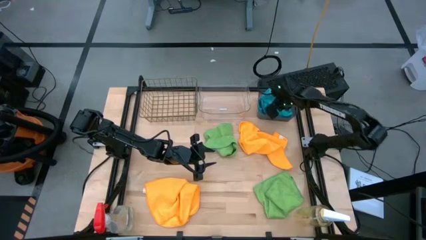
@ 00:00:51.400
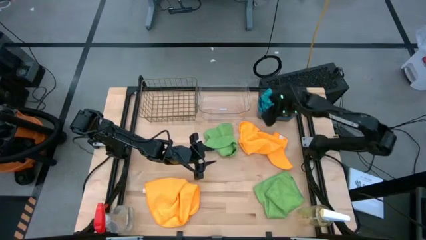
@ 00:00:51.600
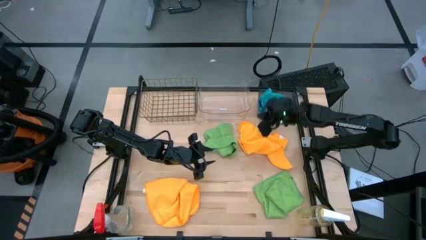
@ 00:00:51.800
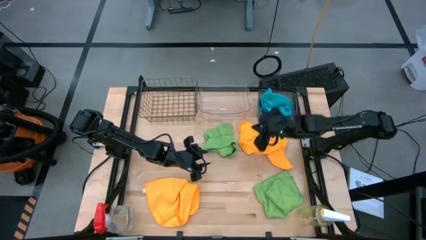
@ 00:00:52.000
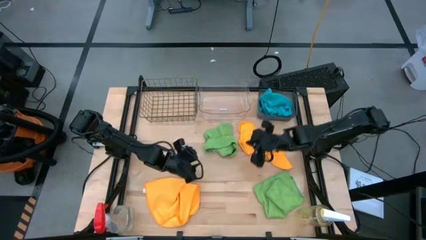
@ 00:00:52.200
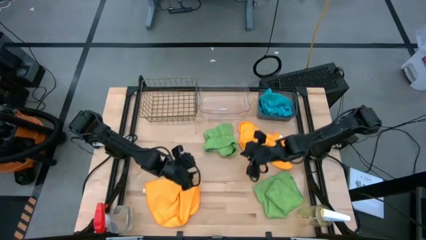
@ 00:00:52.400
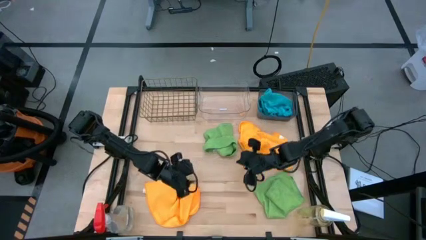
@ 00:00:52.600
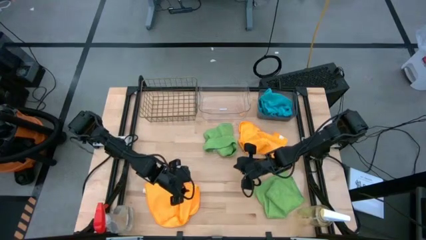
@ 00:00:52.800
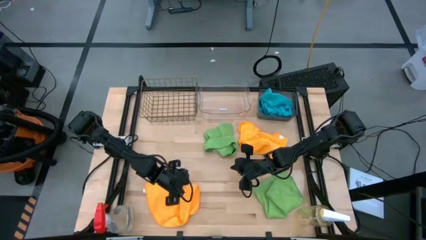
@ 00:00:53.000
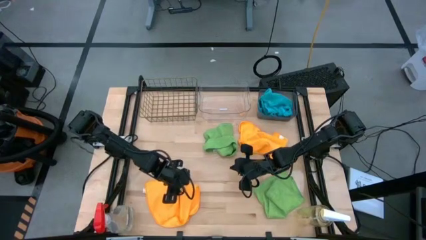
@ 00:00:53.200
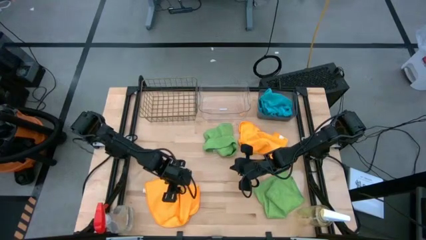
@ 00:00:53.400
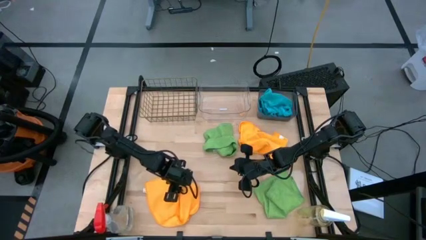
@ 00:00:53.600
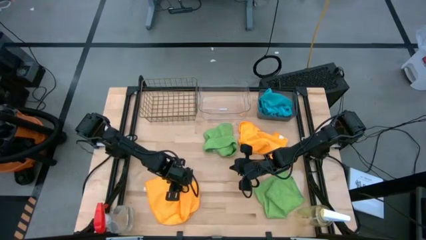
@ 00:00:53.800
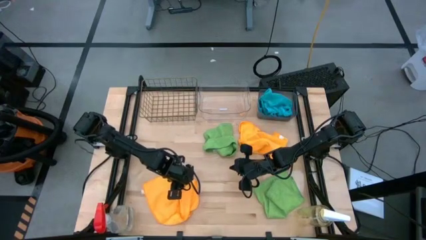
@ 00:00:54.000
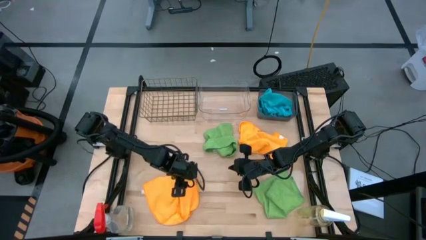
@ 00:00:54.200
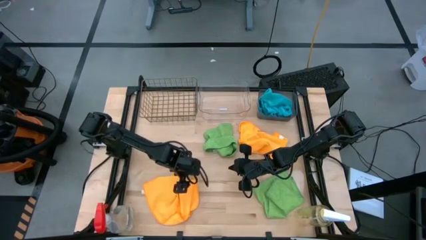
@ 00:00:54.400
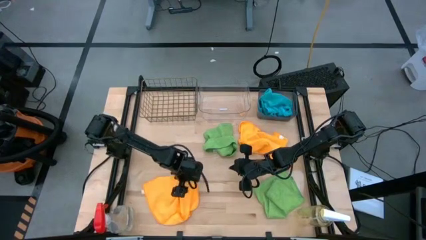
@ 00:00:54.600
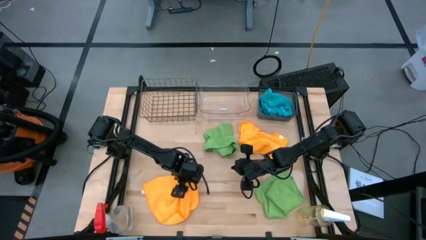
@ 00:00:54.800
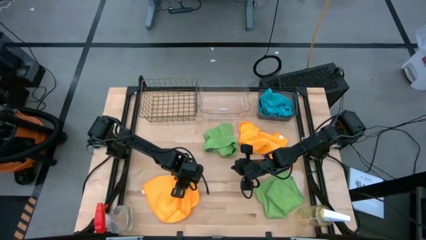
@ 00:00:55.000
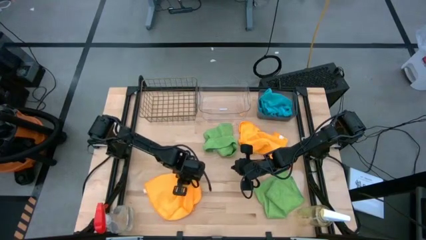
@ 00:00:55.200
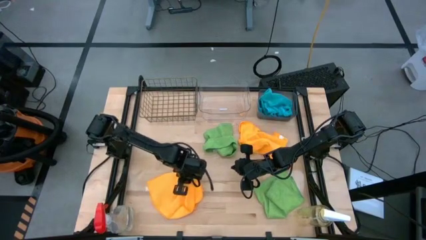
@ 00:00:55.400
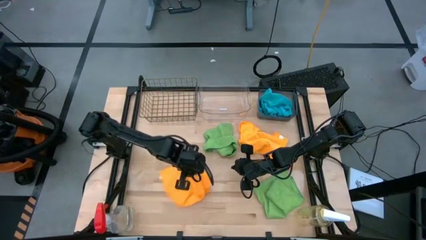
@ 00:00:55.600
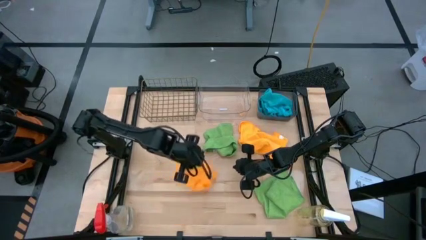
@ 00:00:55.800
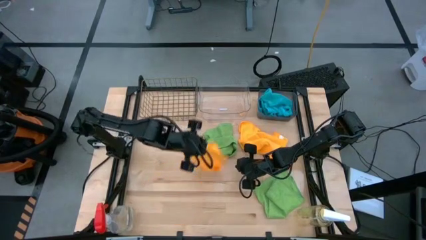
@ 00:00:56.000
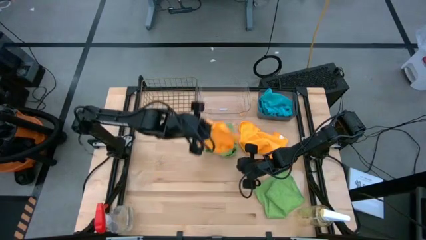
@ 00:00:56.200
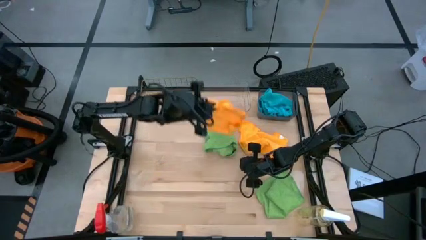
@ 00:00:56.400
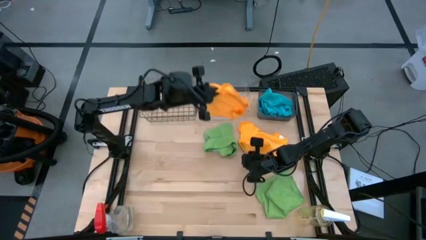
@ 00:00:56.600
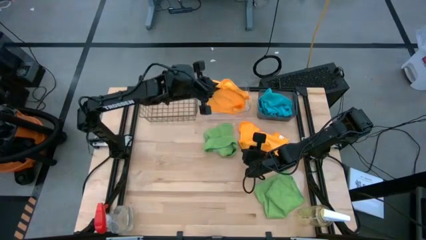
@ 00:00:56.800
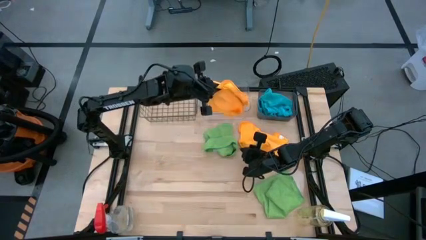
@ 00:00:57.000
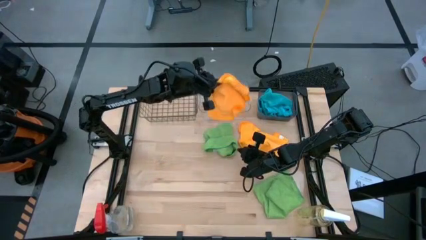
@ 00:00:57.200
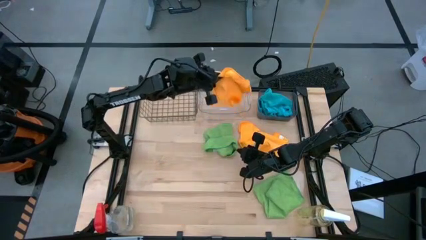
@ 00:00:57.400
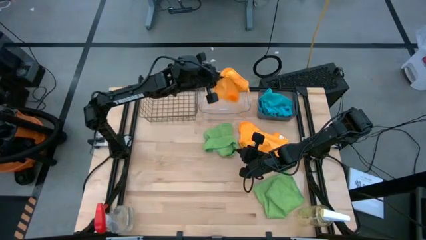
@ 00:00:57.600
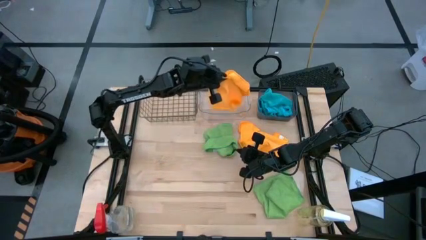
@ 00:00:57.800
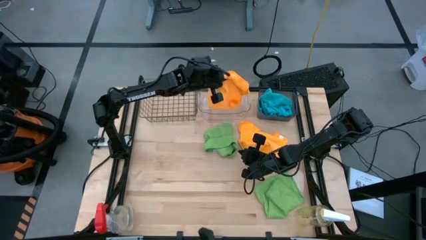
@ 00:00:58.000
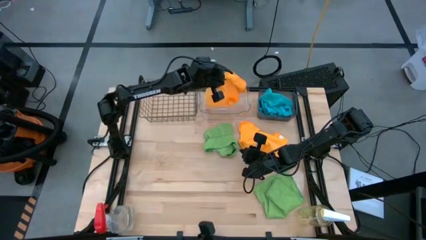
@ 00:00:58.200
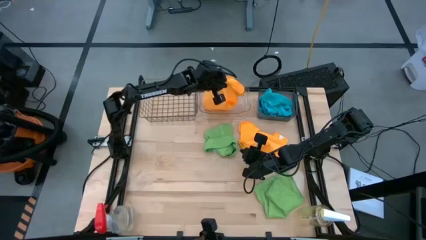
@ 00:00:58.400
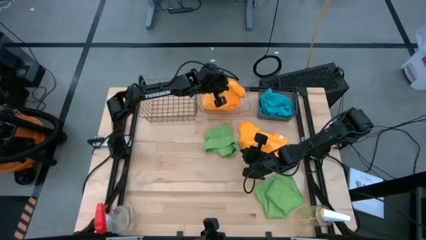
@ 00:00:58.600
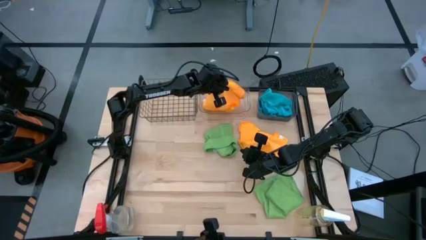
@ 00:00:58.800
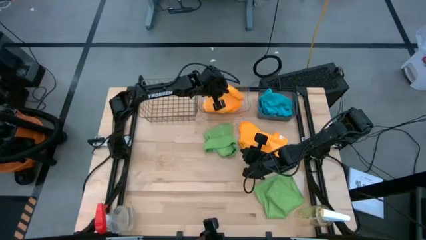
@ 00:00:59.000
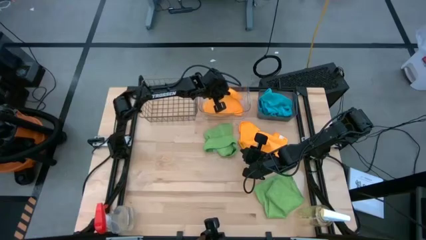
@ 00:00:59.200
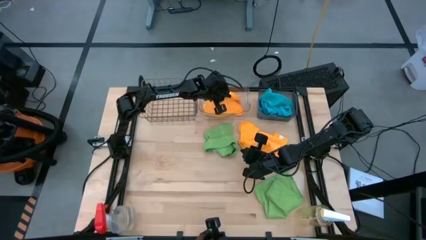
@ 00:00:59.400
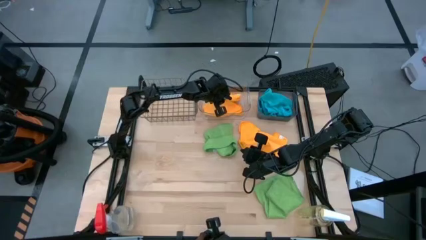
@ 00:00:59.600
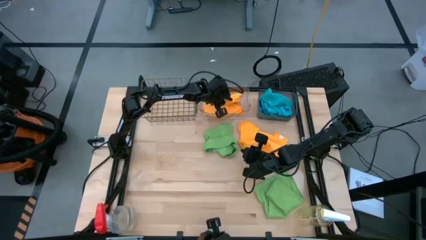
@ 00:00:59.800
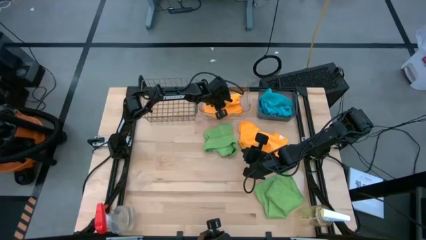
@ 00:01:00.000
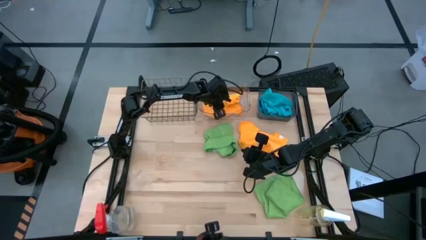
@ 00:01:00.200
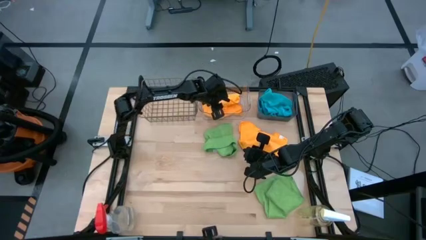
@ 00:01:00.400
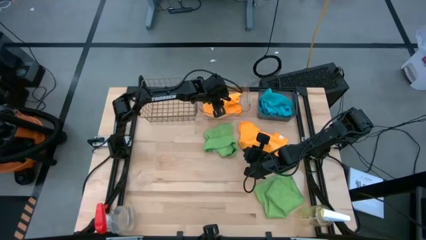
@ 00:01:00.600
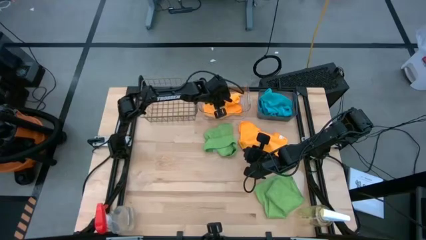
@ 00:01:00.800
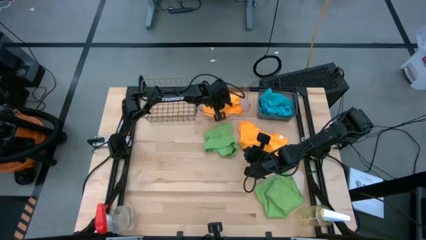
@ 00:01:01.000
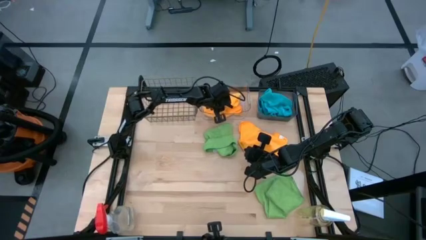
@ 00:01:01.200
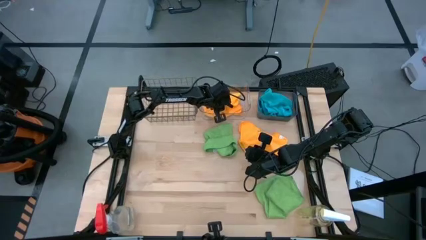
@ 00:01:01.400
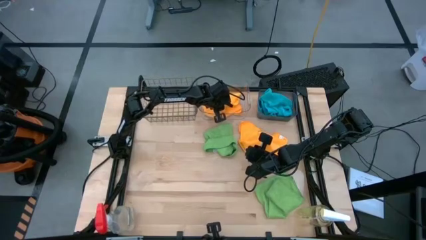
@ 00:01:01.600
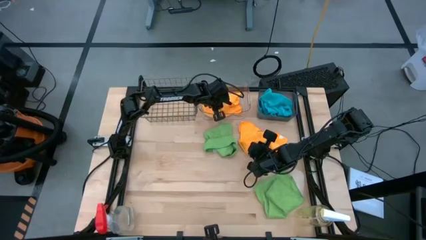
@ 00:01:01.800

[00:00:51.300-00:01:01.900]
Task: Sort microfiber towel by color & place in baskets
Put the left yellow microfiber towel into the transparent bin
